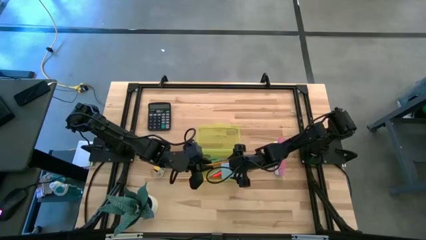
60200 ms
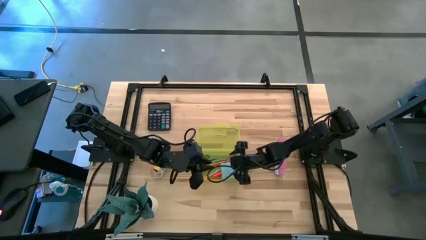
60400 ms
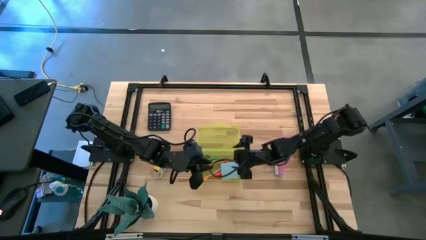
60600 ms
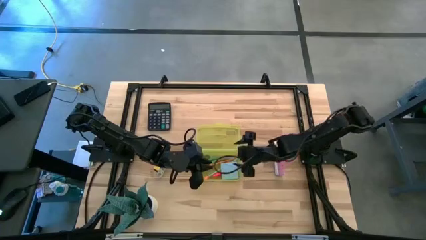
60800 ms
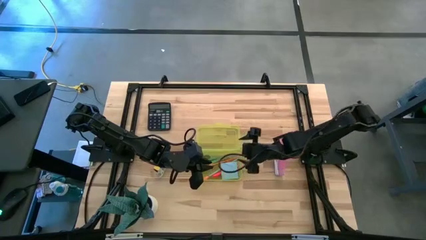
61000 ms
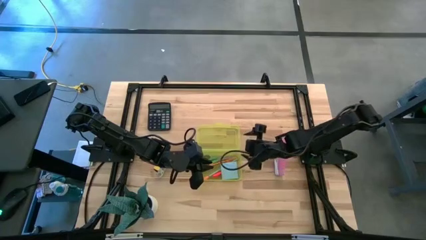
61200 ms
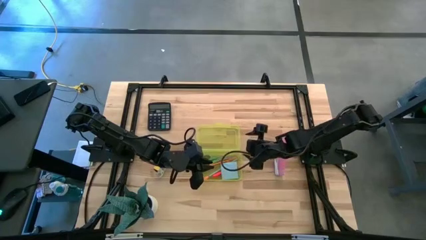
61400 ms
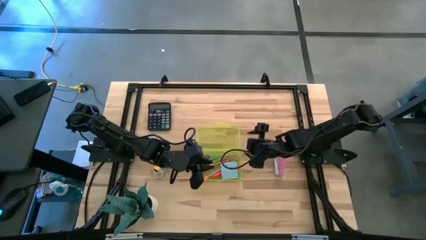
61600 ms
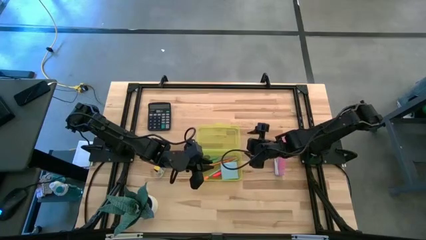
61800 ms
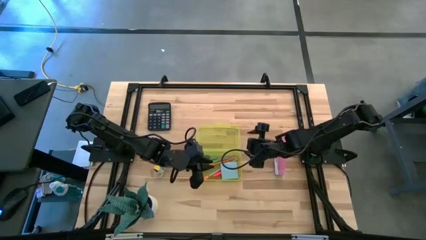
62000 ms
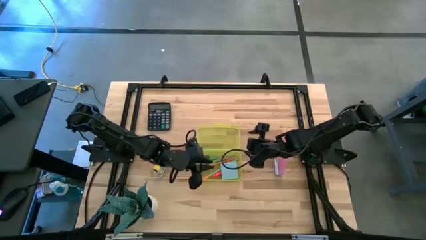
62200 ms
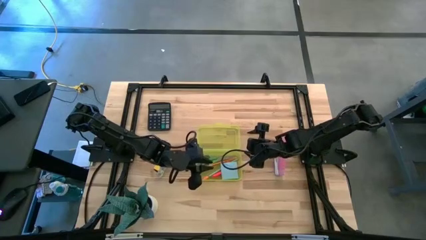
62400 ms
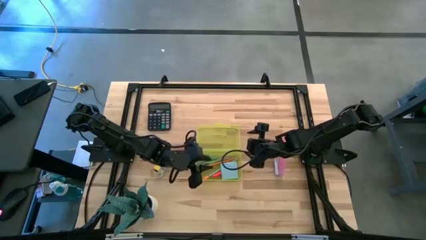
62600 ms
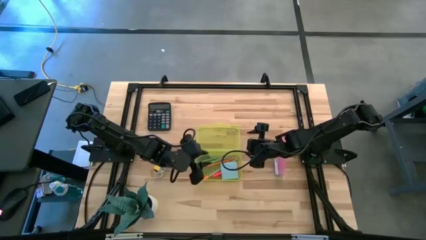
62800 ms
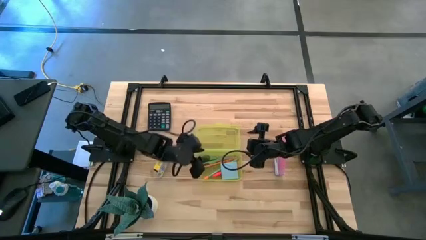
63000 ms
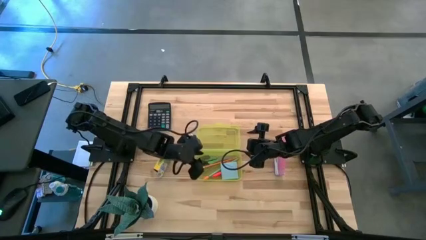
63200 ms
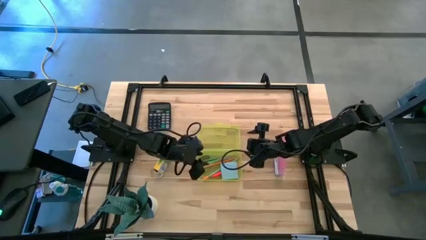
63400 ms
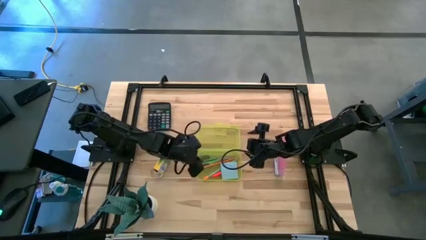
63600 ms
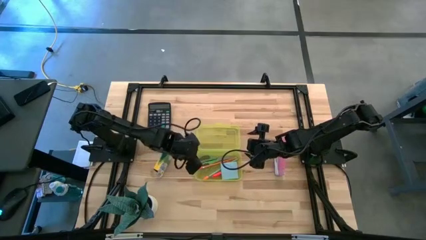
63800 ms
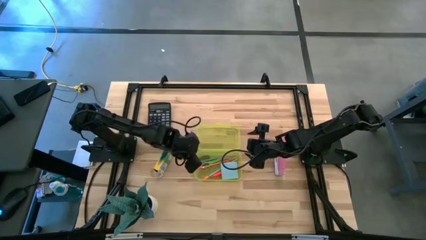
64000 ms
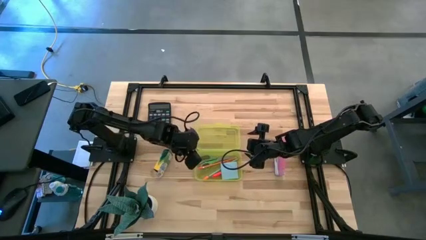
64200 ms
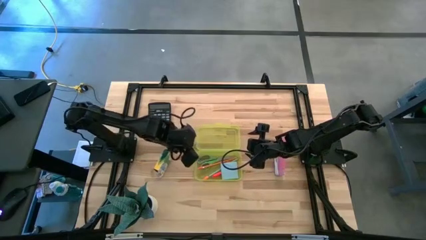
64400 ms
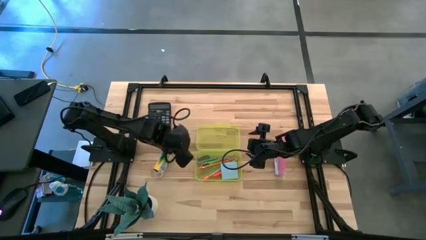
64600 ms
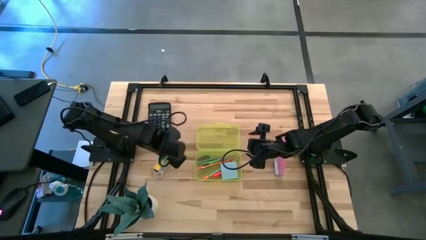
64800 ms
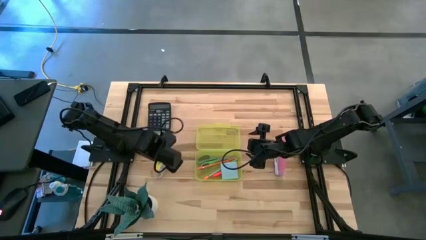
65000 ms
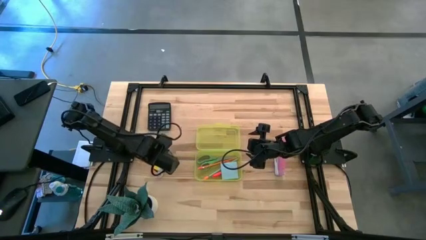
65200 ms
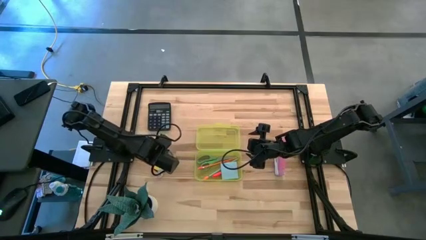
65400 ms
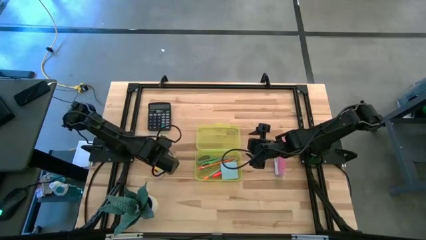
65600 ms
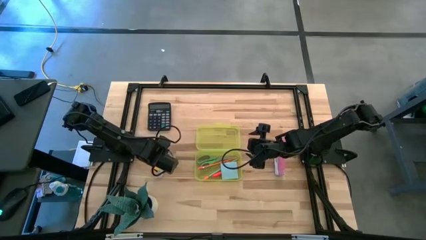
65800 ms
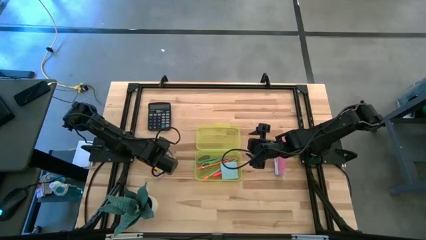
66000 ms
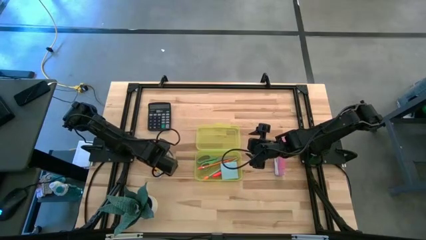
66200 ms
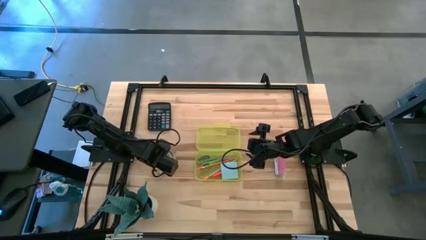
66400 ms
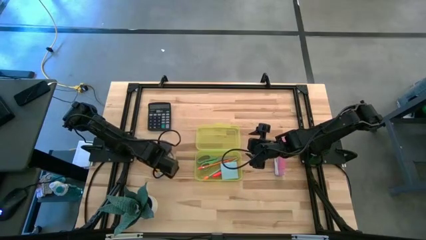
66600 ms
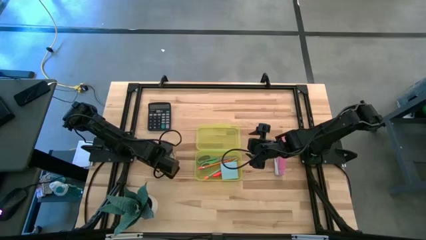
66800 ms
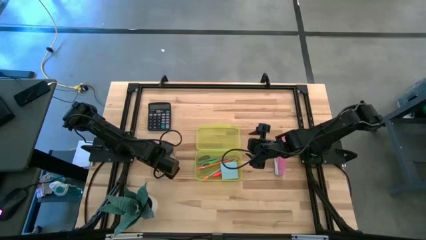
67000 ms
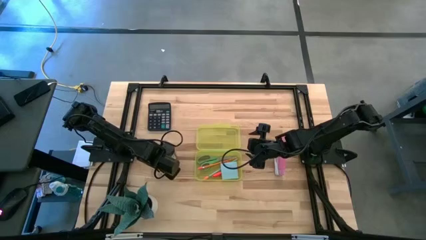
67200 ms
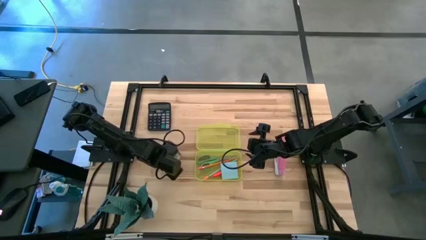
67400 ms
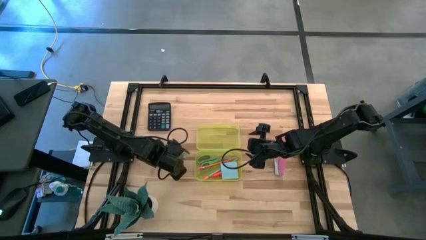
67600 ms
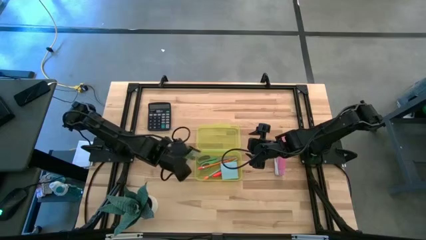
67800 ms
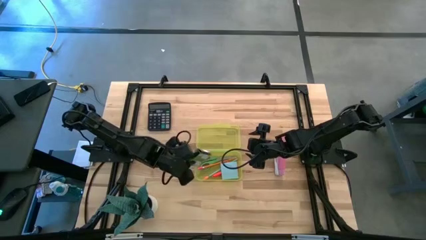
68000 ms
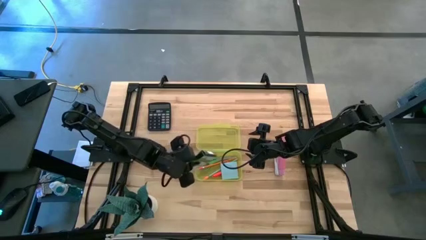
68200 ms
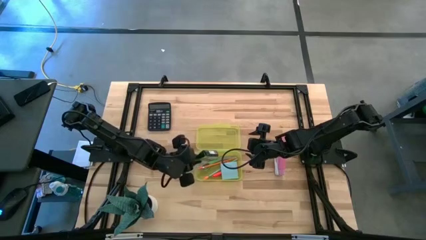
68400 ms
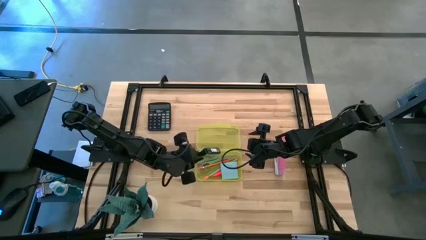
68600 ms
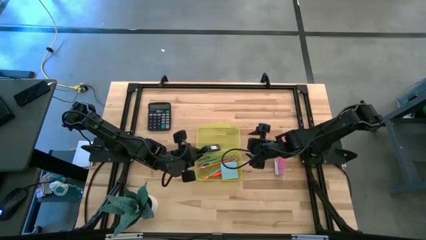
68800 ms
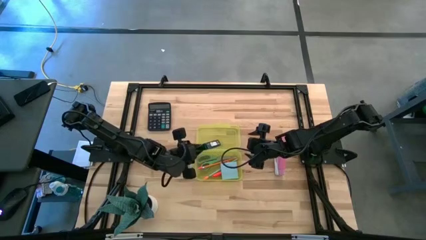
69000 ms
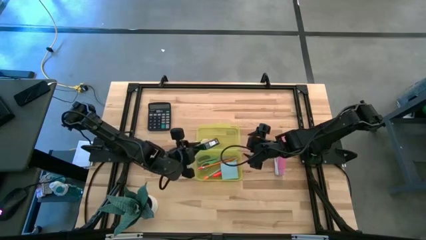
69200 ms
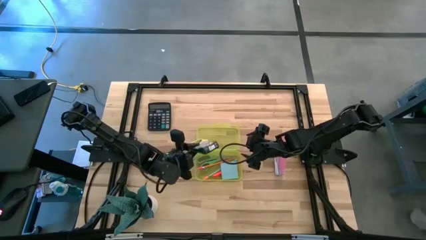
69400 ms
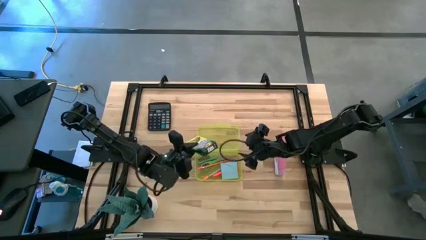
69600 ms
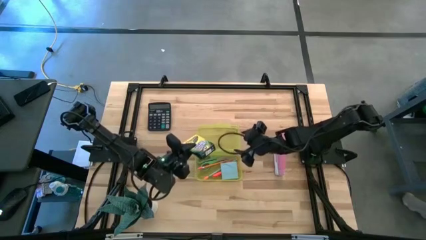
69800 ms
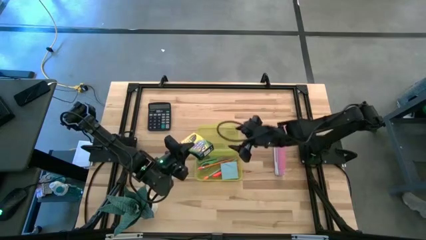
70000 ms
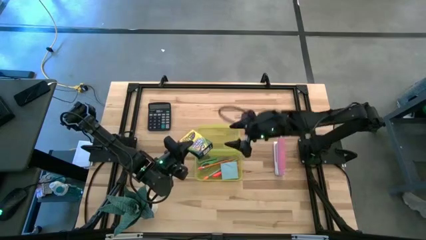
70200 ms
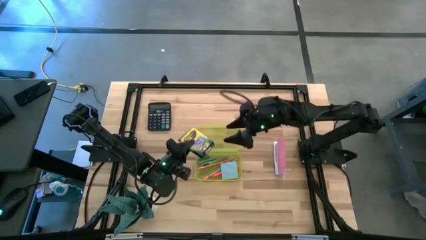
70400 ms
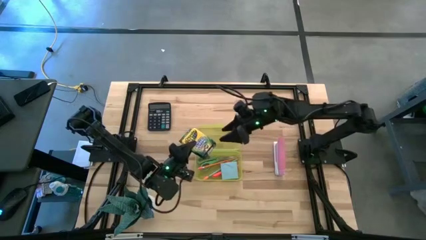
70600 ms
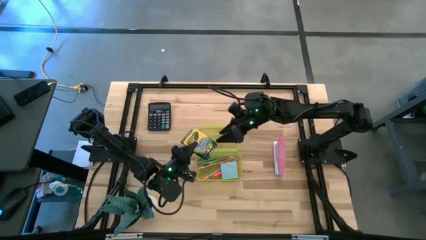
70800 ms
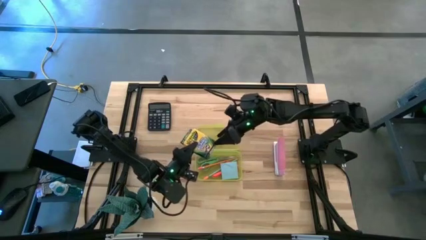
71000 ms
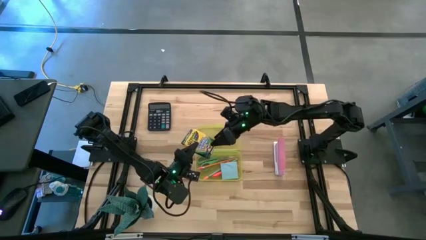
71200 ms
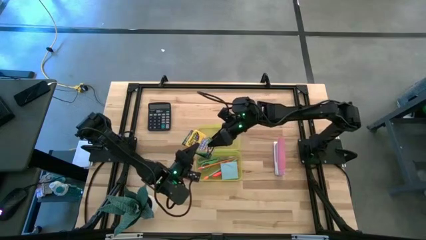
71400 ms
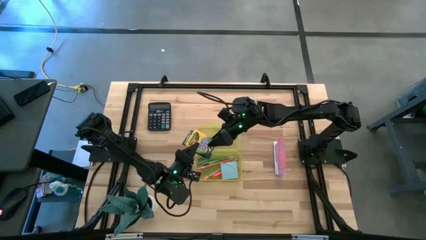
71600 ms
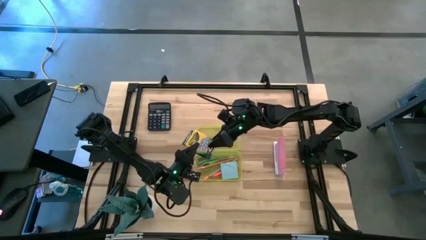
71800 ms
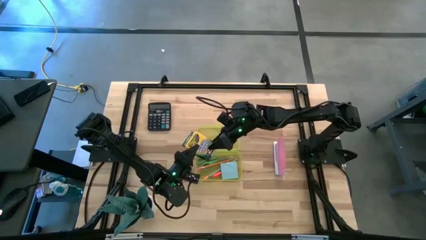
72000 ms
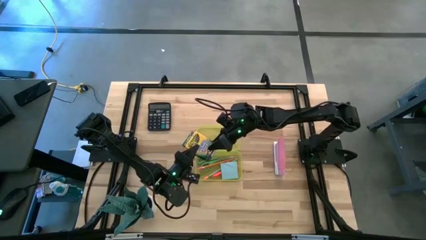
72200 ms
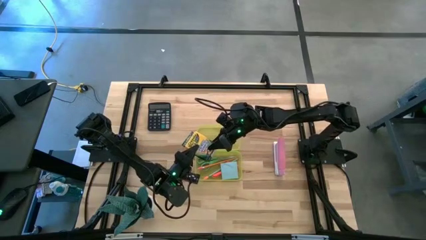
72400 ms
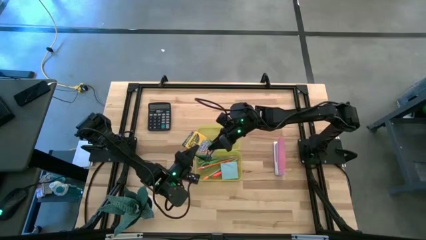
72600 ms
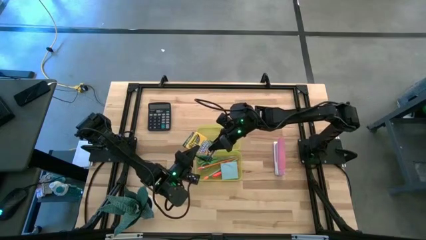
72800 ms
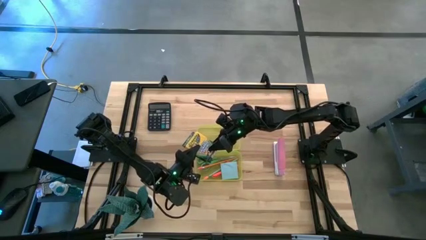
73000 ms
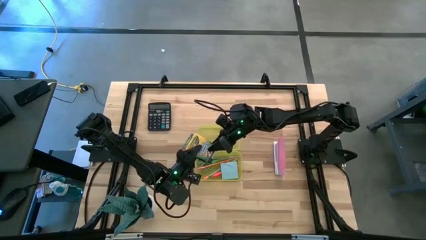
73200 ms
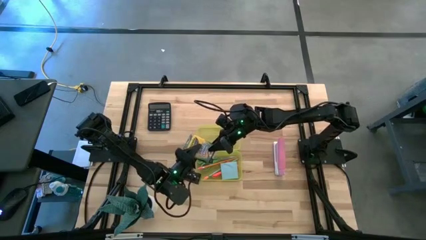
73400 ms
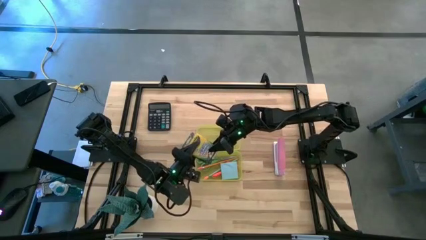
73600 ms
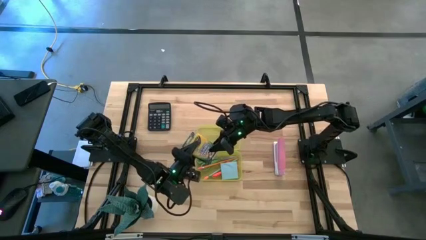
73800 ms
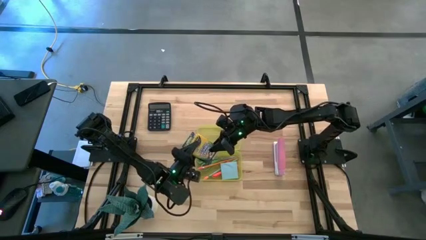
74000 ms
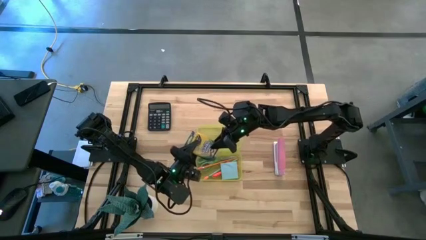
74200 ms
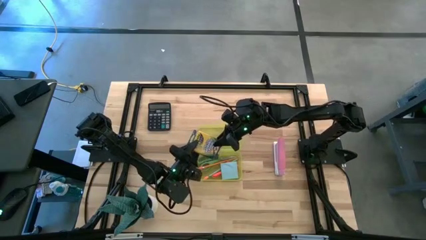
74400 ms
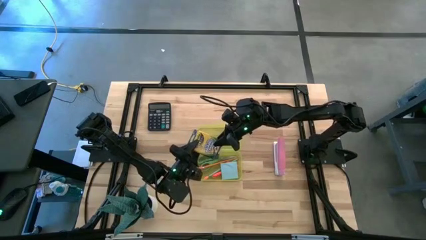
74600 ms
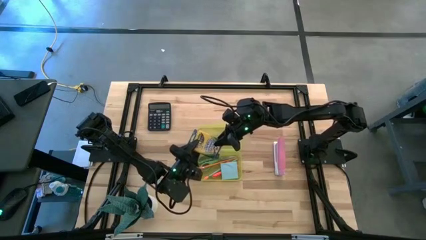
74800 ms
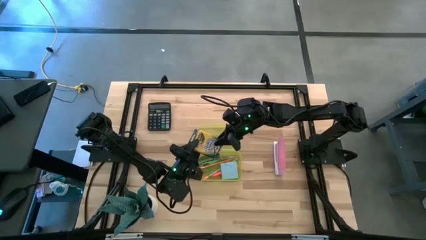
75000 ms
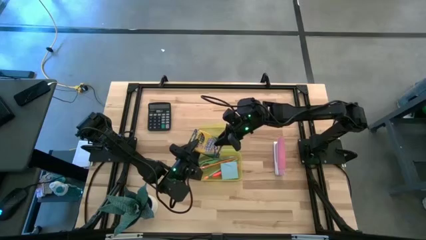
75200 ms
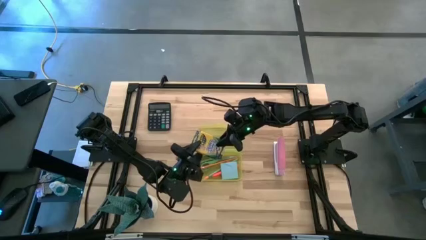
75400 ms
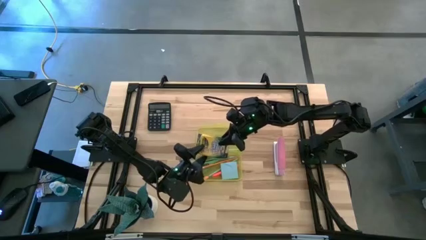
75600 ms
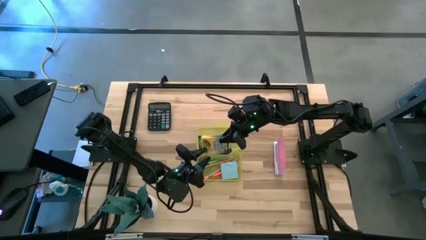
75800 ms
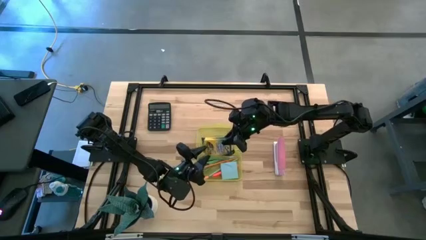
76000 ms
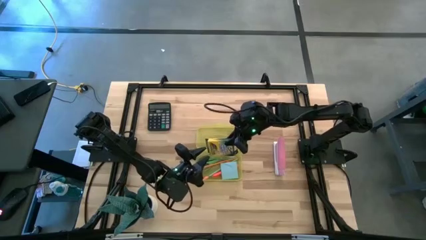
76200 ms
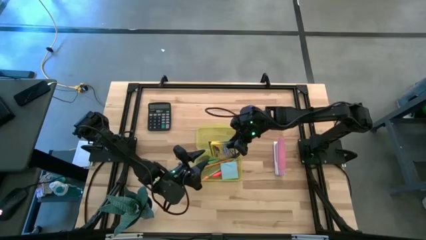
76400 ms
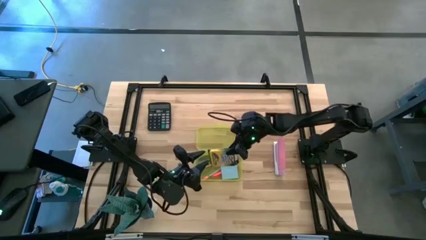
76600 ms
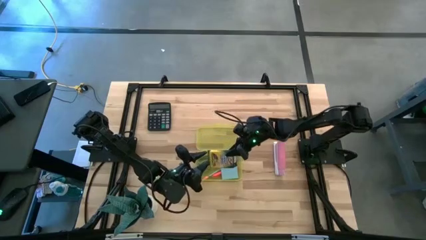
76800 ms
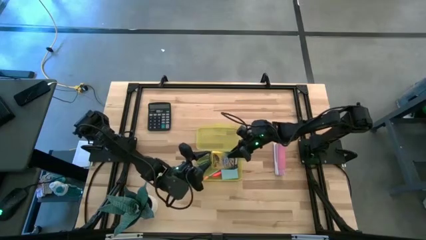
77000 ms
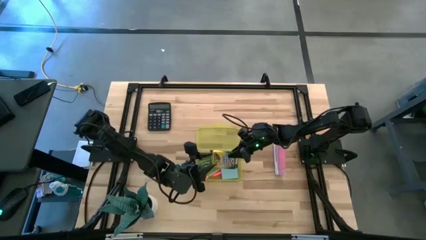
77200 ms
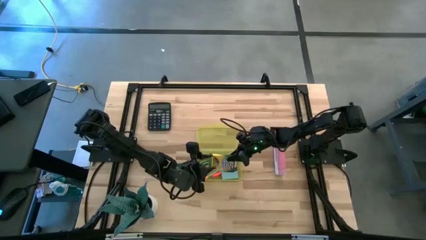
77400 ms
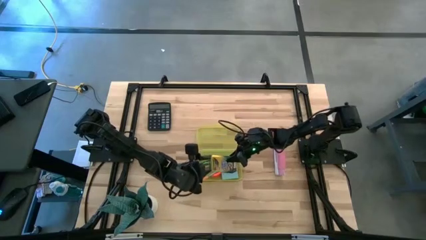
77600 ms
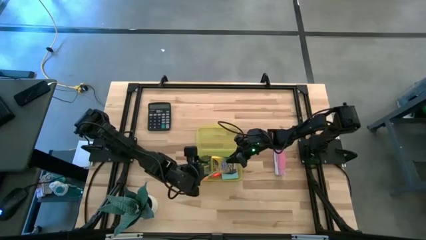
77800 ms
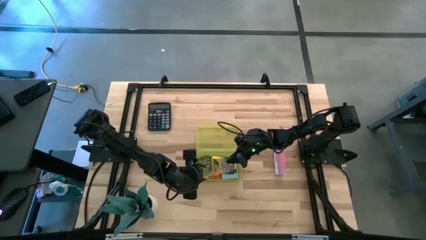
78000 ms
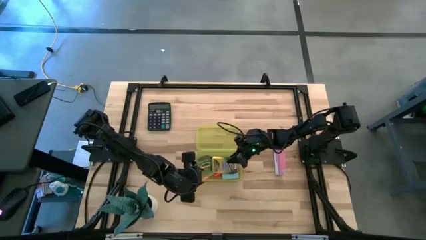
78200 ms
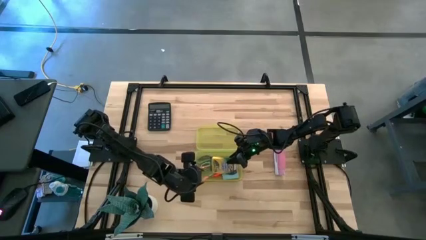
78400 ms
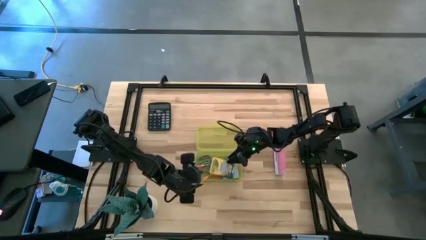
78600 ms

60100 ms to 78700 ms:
Task: Pack school essentials
Put the yellow crayon box into the yellow supply box
